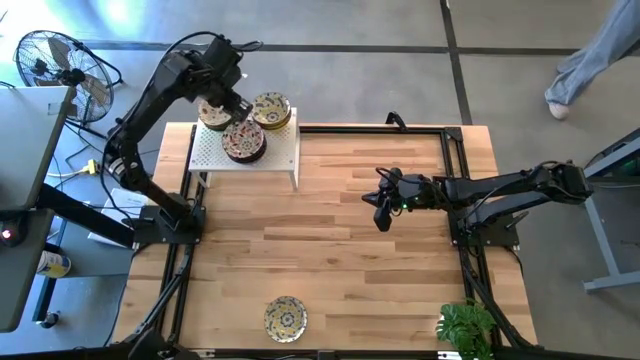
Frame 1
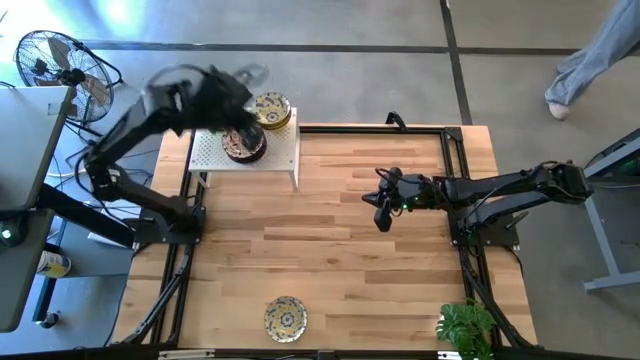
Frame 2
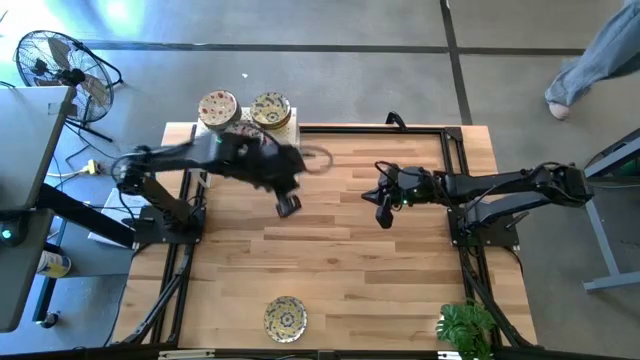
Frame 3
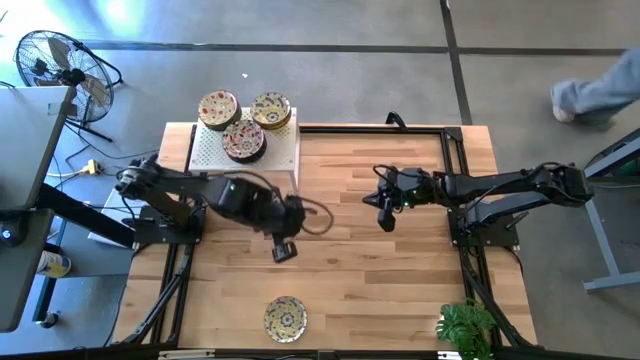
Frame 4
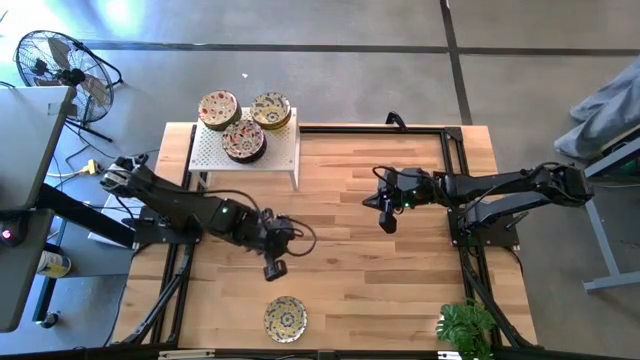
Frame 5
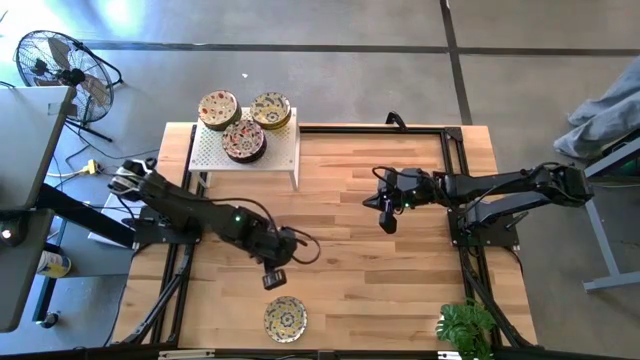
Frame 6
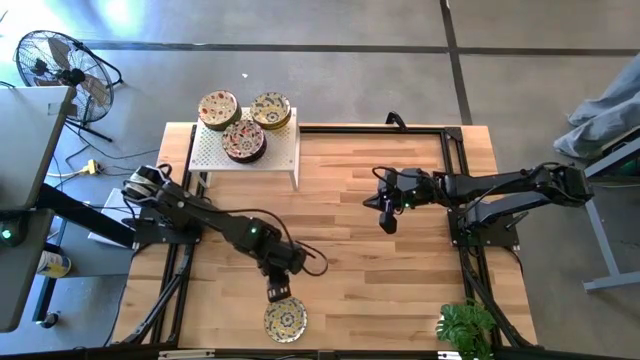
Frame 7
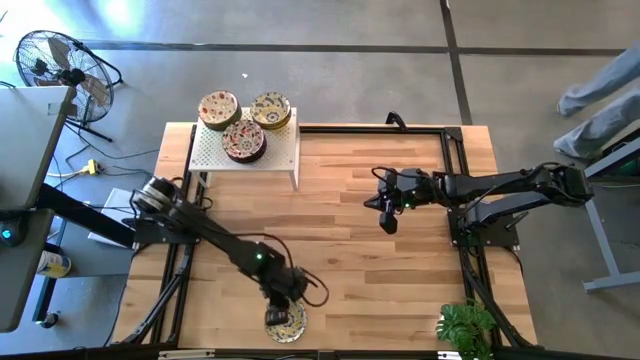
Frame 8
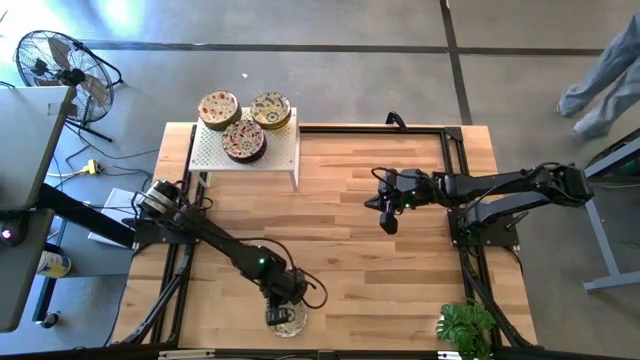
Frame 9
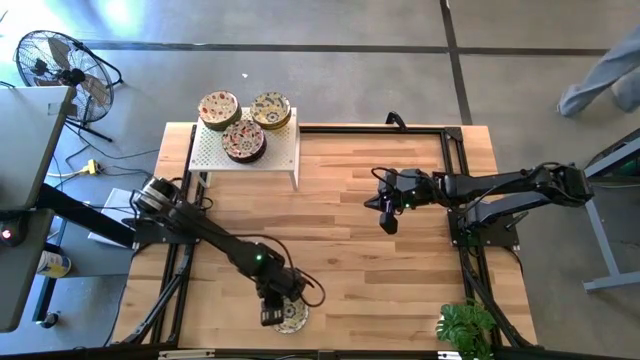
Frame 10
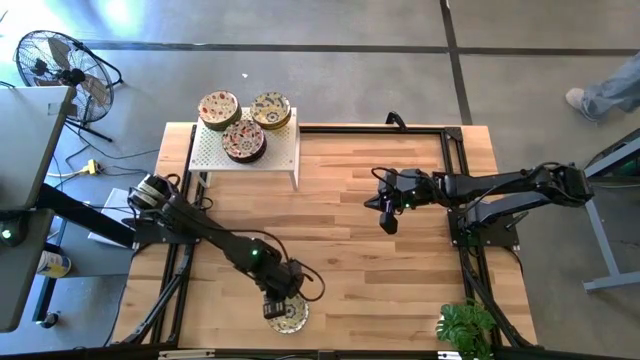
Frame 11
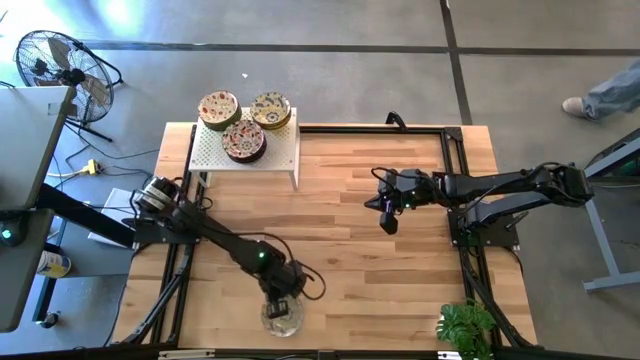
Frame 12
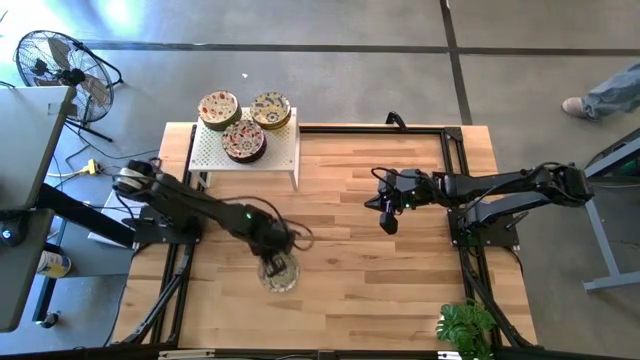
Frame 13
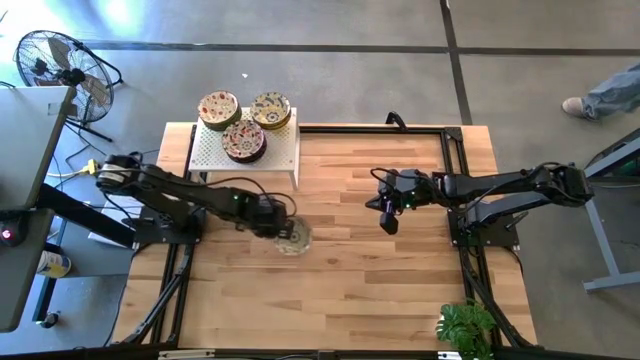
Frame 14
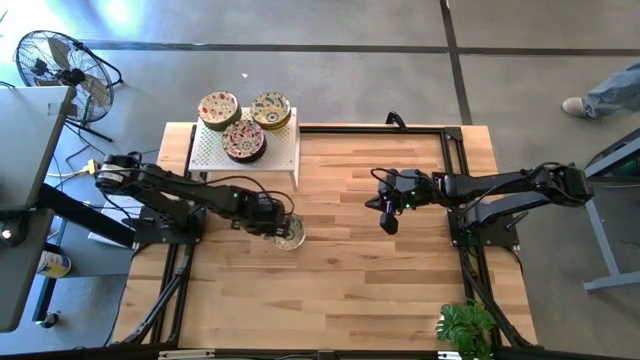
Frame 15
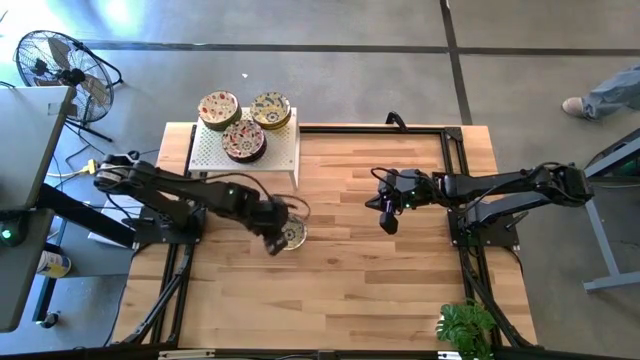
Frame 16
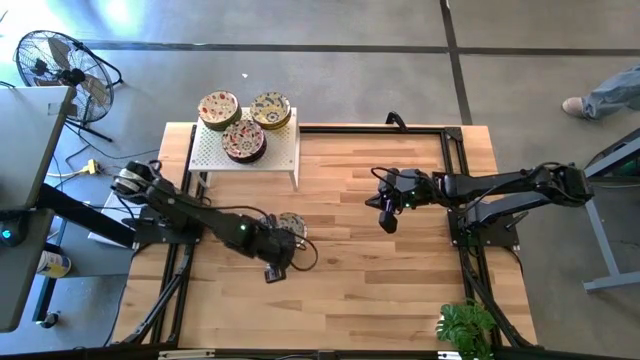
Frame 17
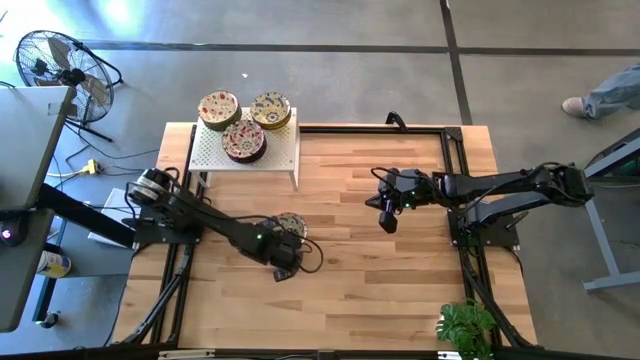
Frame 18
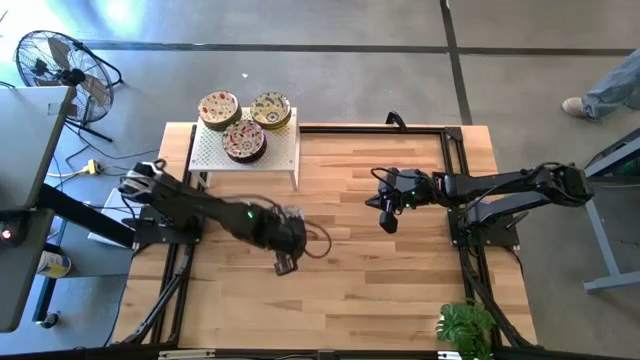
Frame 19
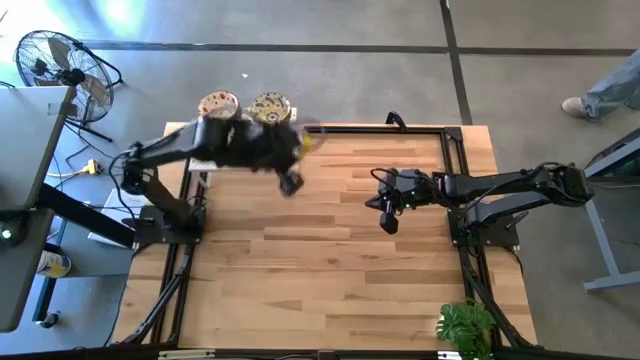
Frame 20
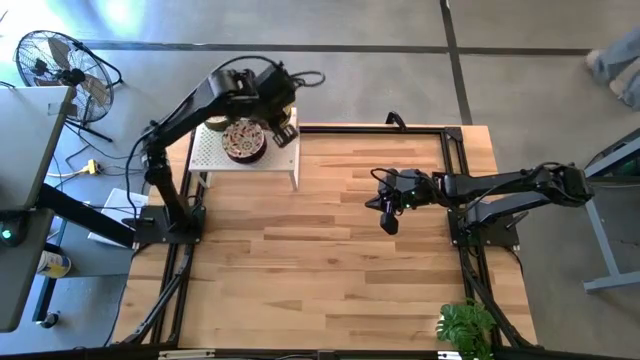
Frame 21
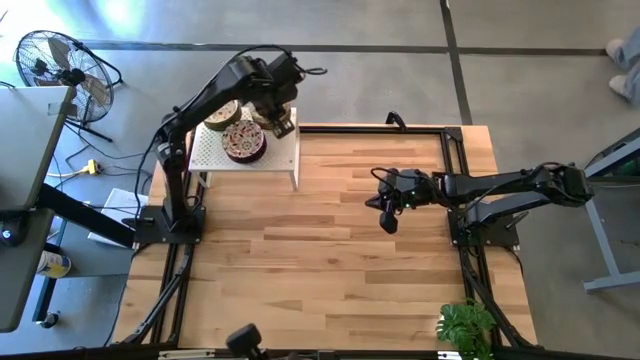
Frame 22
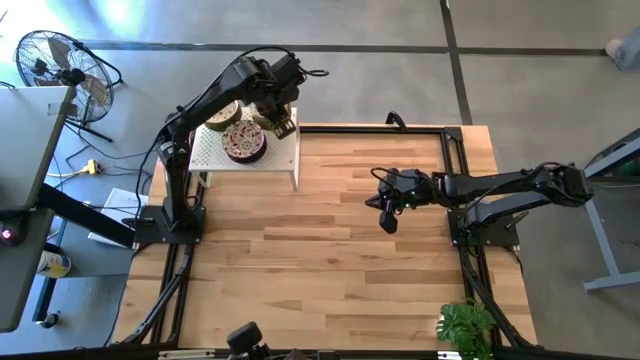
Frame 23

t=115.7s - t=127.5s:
Task: Pick & Place Mini bowls
Stack the yellow patterned bowl on the yellow patterned bowl on the shelf

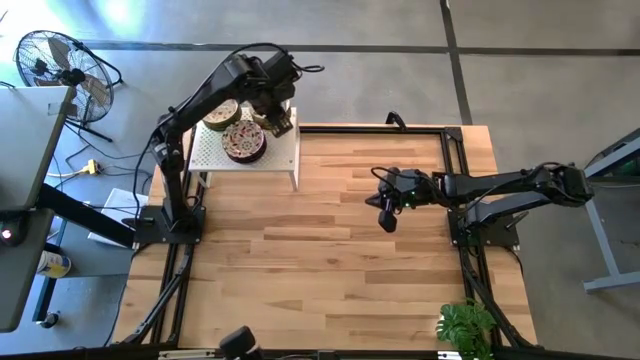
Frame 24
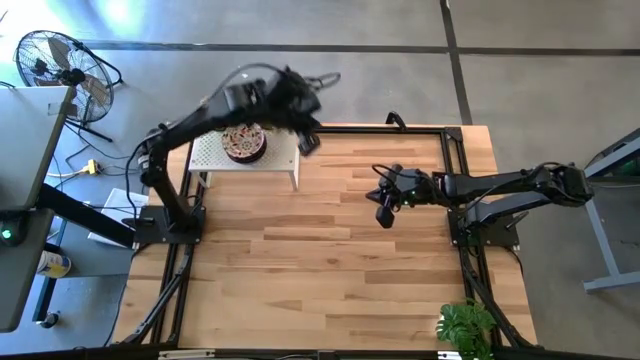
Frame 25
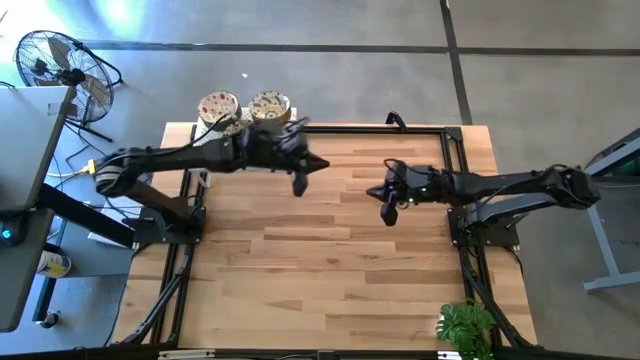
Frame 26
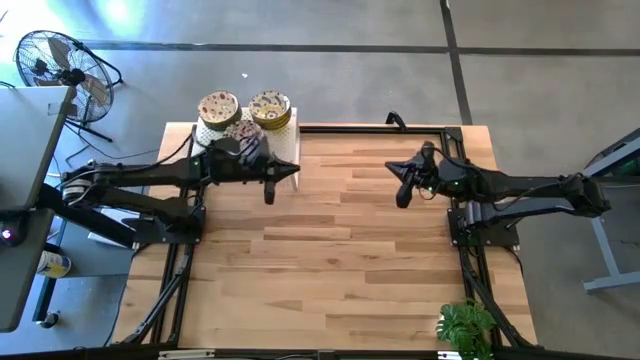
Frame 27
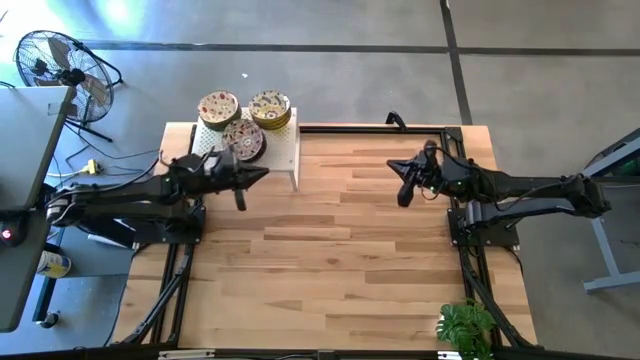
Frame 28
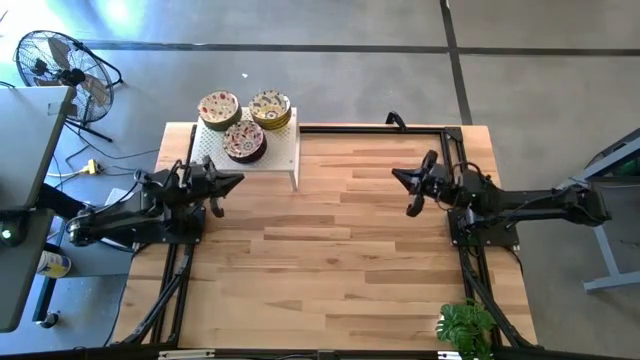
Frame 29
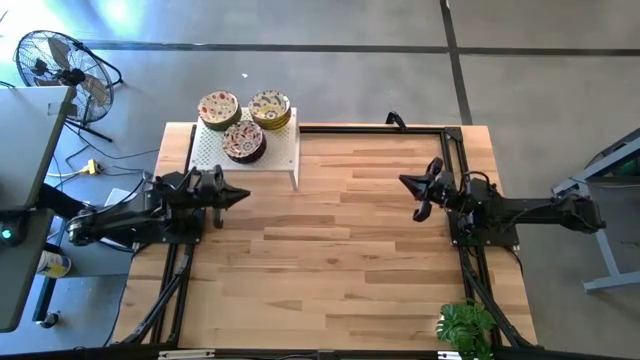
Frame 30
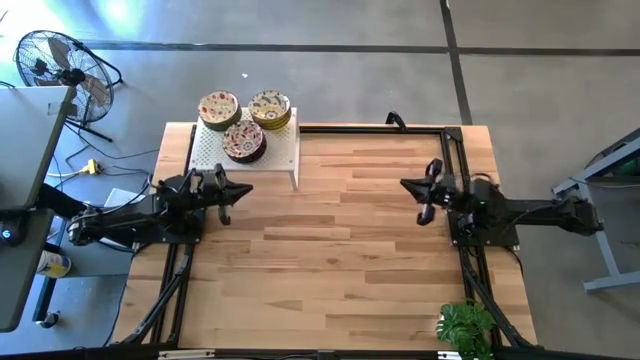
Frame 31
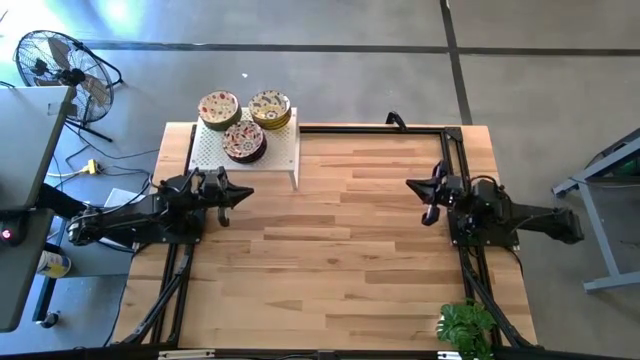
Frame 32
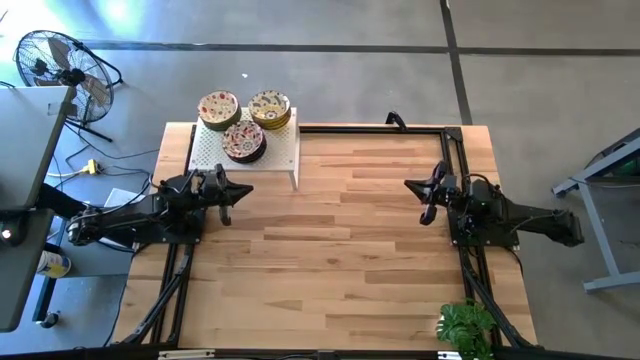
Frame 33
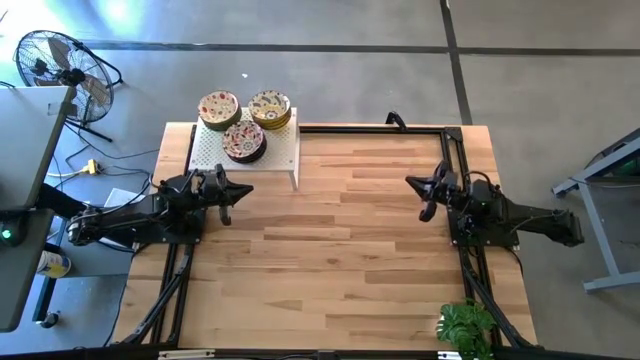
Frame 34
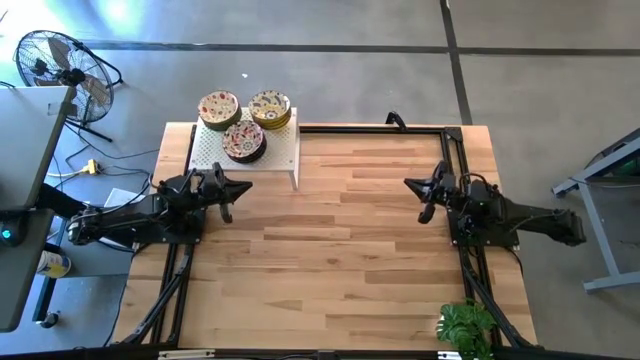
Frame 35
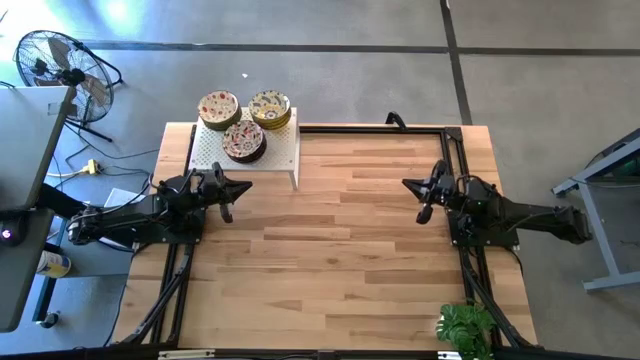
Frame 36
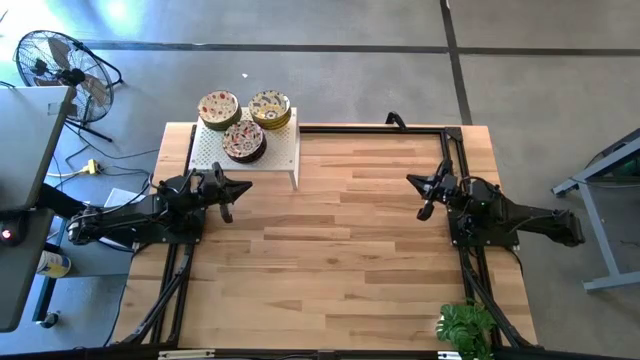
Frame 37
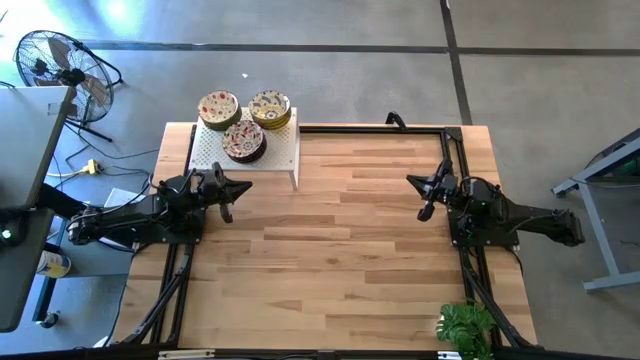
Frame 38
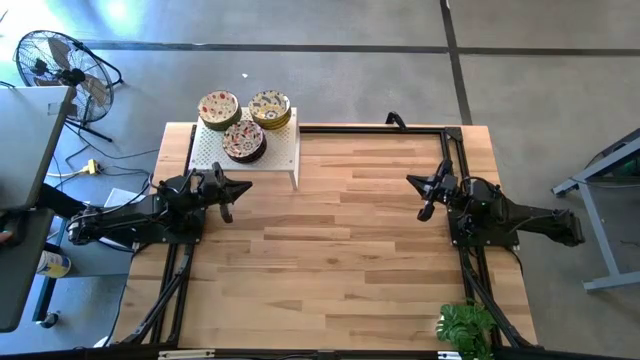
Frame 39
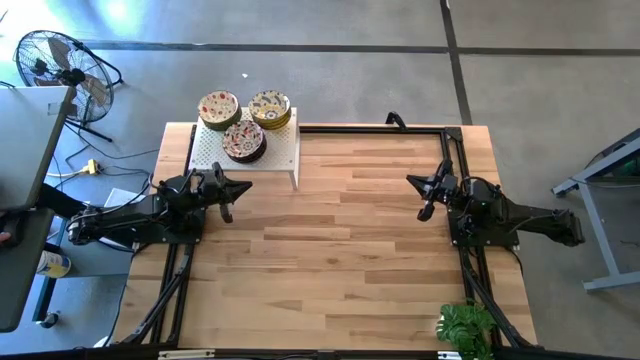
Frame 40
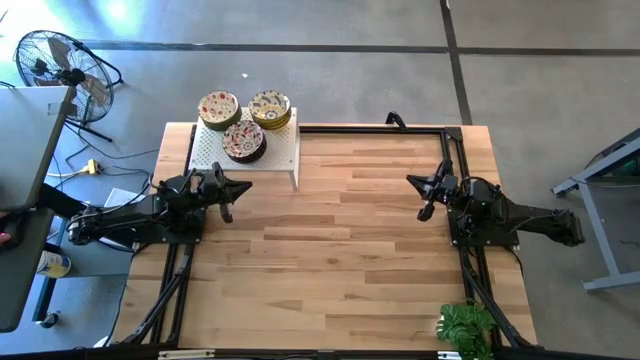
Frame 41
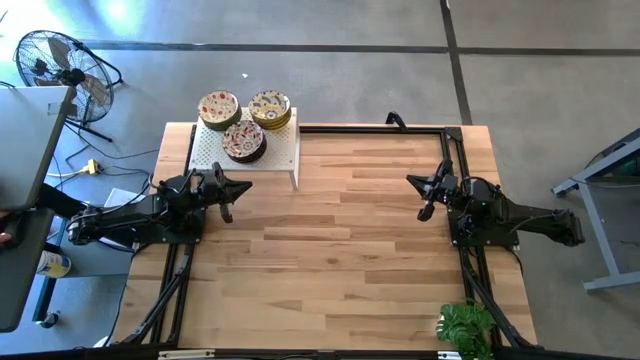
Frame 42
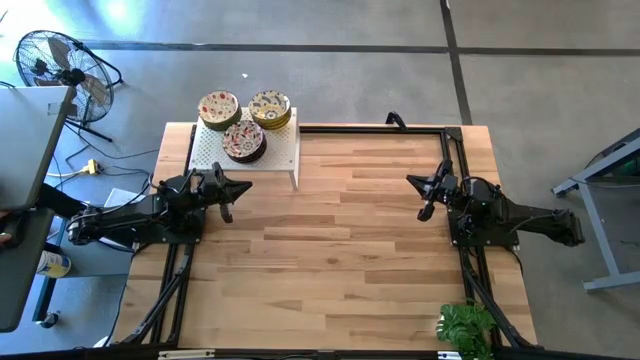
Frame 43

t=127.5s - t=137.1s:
Return to home Position
